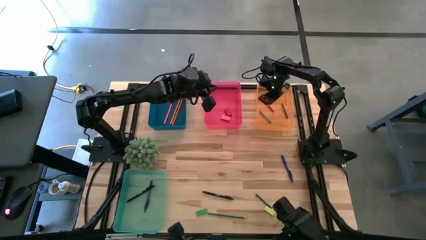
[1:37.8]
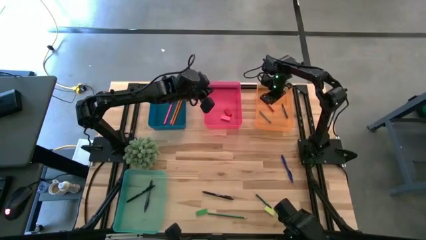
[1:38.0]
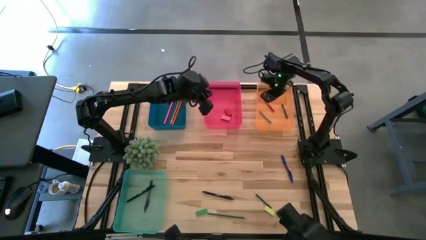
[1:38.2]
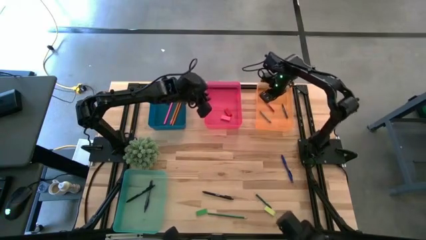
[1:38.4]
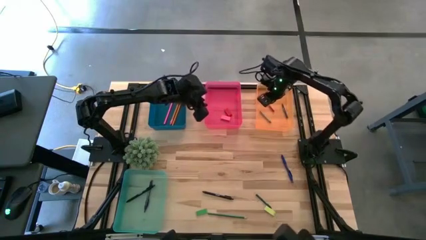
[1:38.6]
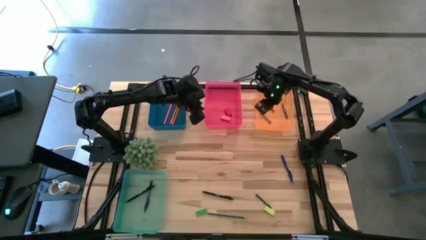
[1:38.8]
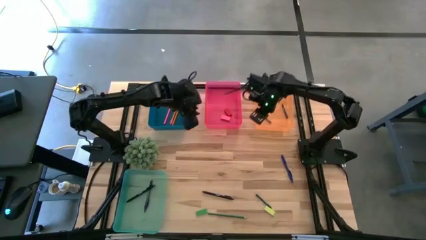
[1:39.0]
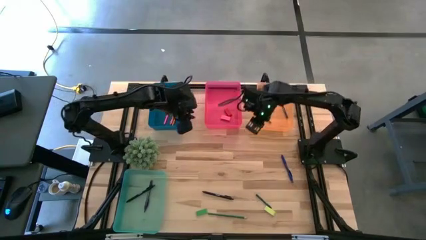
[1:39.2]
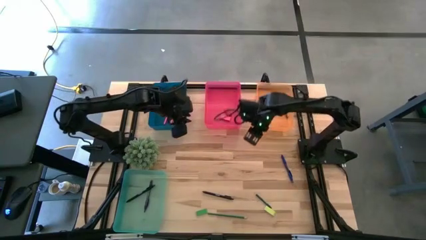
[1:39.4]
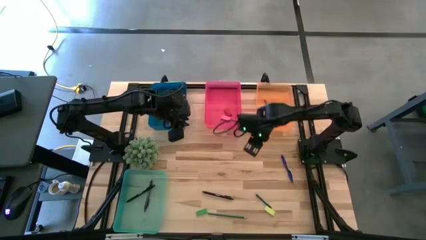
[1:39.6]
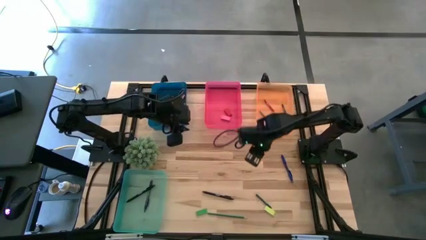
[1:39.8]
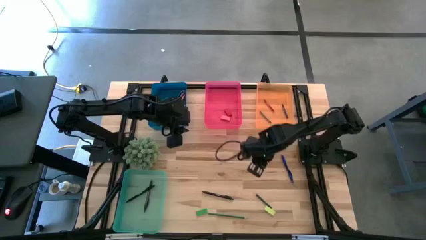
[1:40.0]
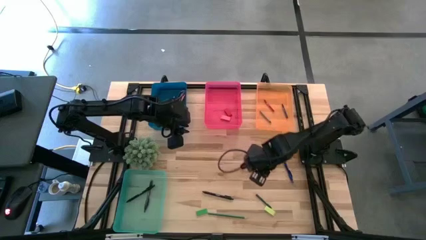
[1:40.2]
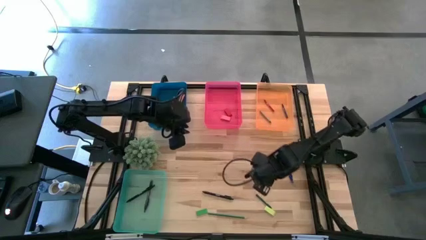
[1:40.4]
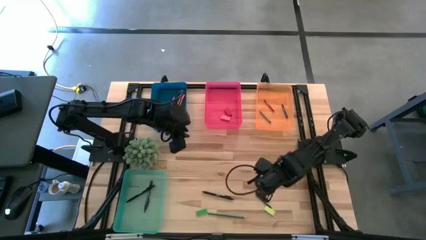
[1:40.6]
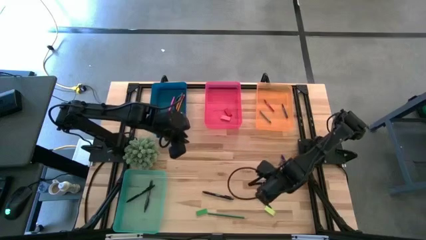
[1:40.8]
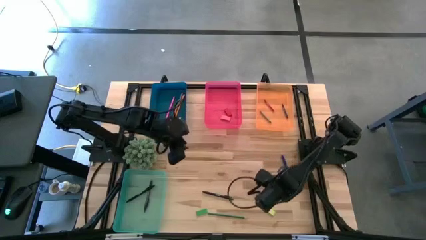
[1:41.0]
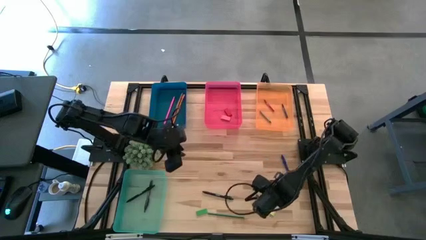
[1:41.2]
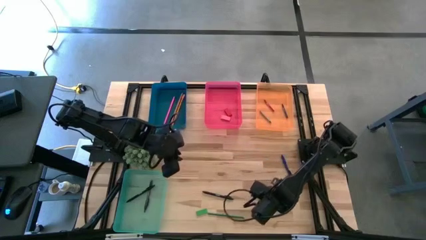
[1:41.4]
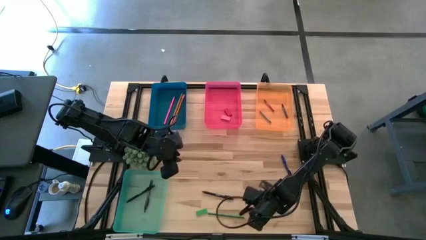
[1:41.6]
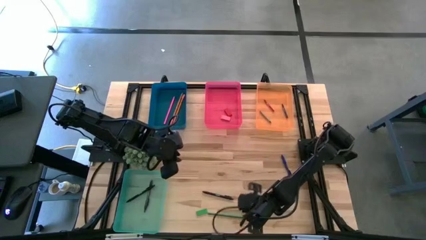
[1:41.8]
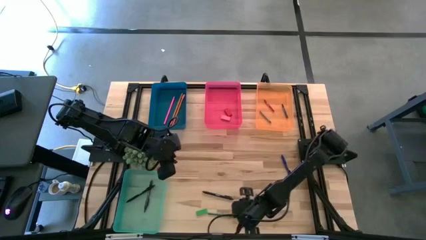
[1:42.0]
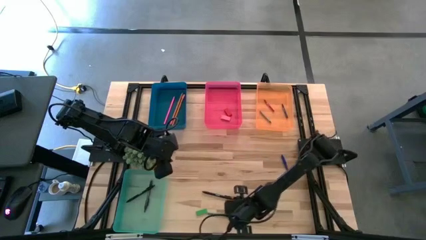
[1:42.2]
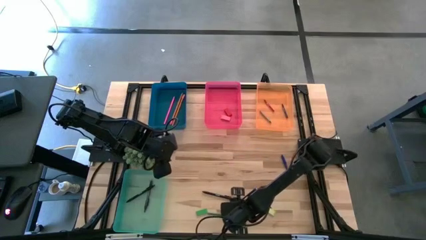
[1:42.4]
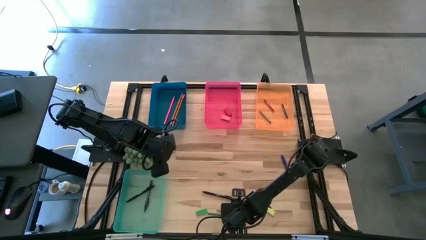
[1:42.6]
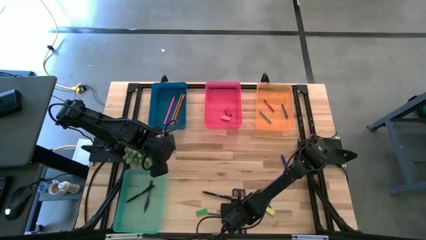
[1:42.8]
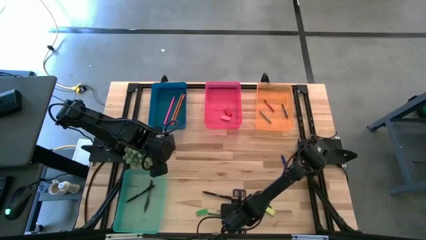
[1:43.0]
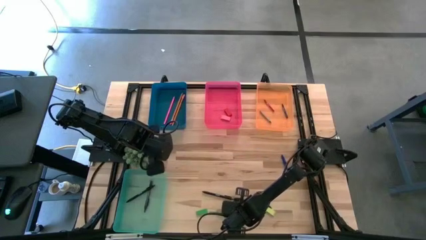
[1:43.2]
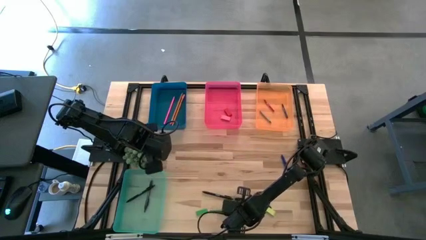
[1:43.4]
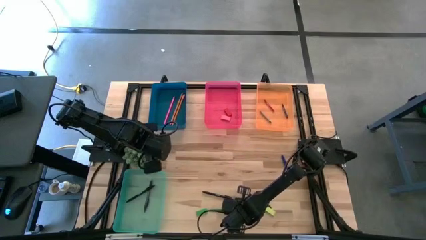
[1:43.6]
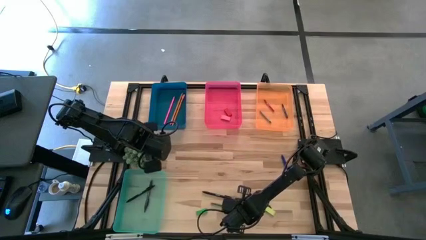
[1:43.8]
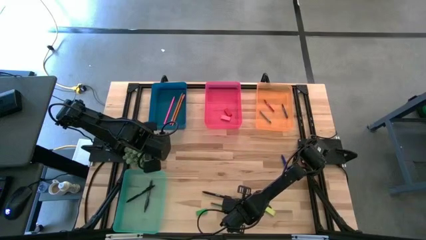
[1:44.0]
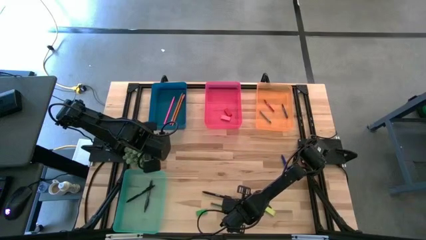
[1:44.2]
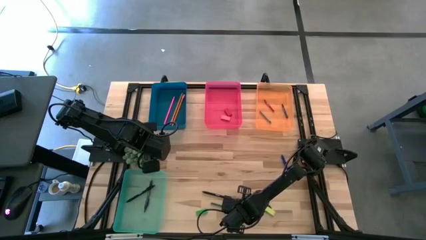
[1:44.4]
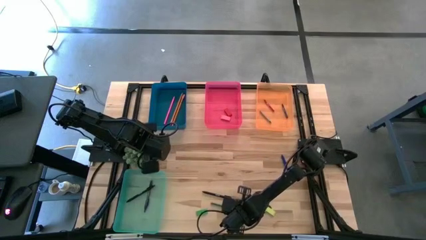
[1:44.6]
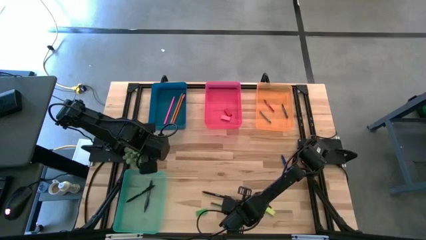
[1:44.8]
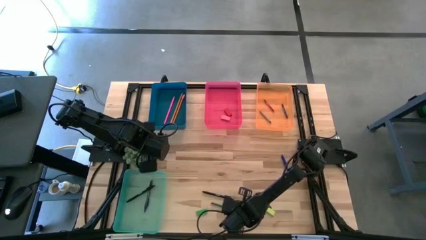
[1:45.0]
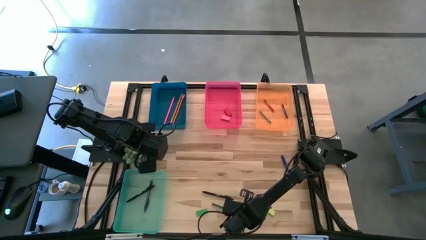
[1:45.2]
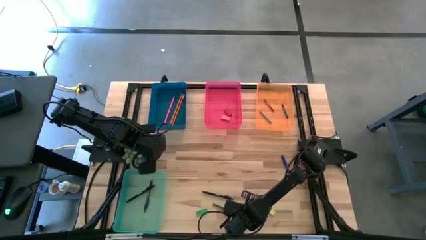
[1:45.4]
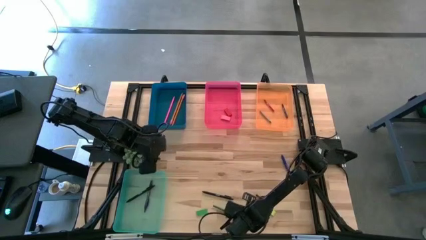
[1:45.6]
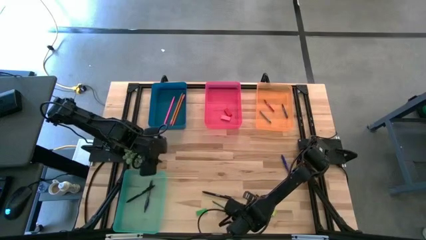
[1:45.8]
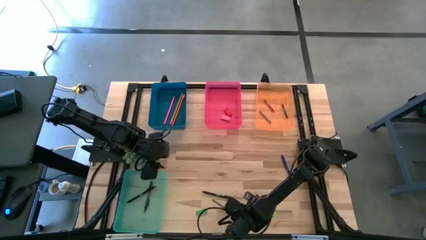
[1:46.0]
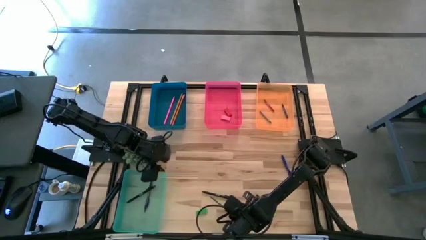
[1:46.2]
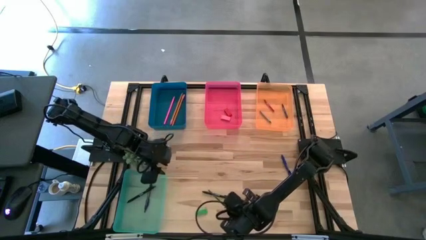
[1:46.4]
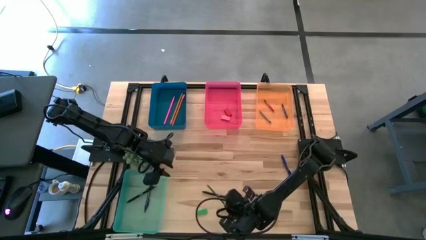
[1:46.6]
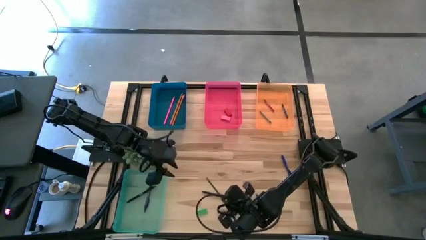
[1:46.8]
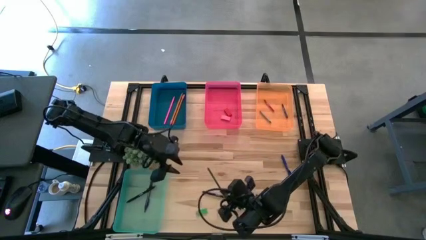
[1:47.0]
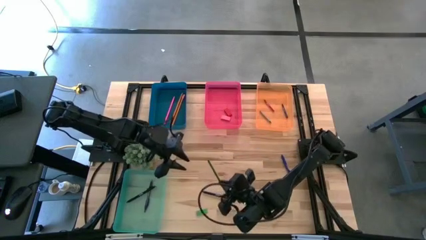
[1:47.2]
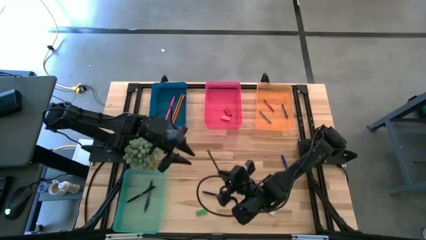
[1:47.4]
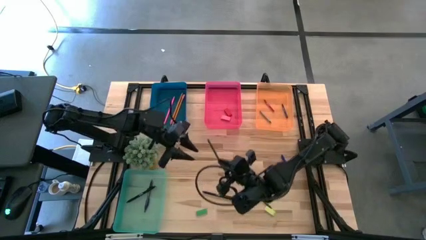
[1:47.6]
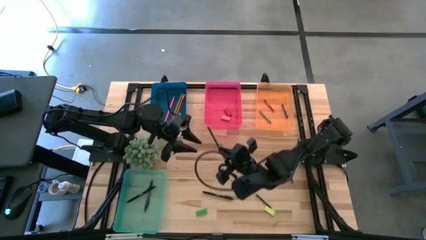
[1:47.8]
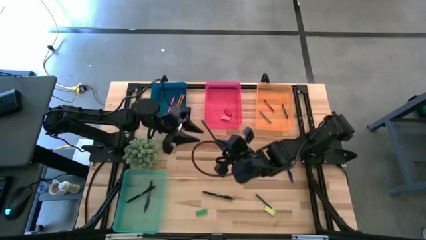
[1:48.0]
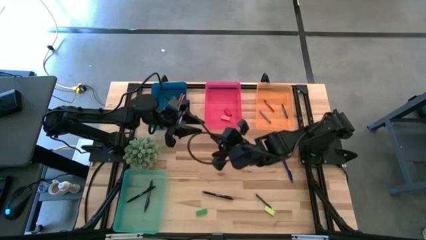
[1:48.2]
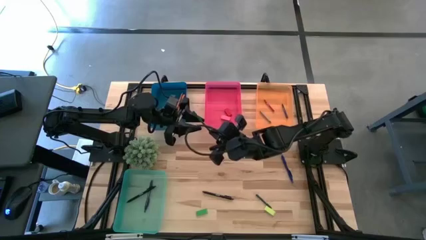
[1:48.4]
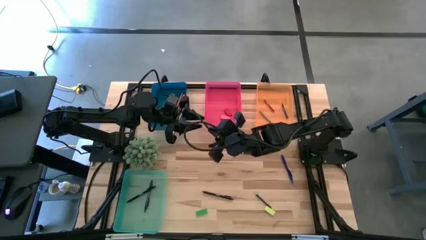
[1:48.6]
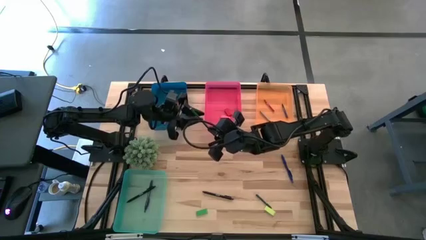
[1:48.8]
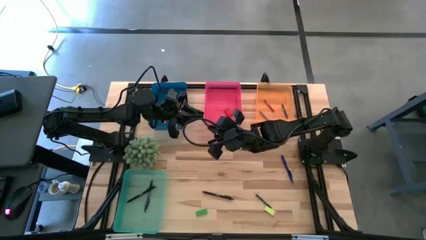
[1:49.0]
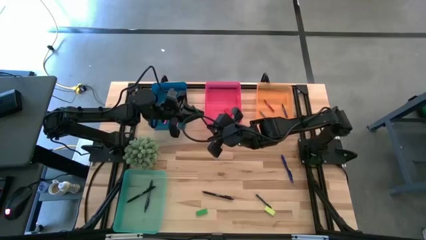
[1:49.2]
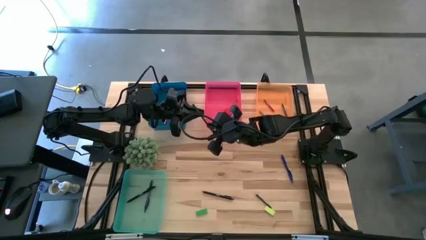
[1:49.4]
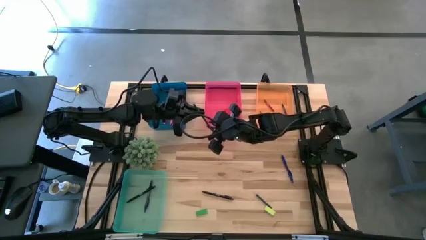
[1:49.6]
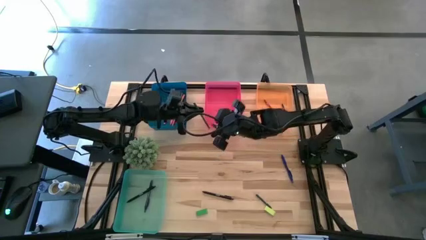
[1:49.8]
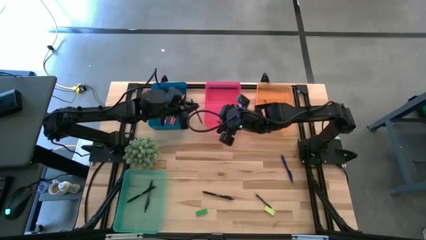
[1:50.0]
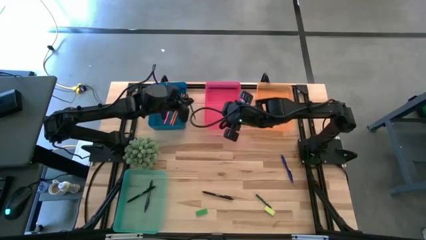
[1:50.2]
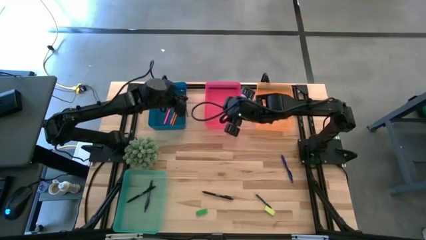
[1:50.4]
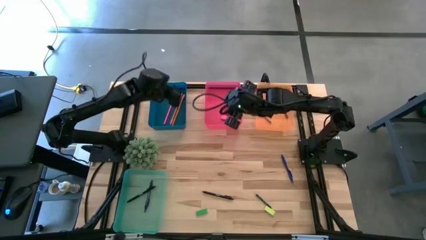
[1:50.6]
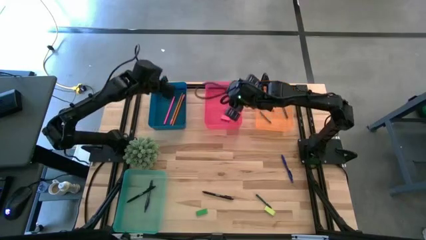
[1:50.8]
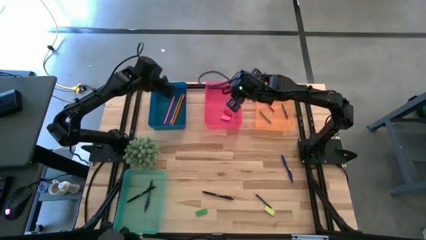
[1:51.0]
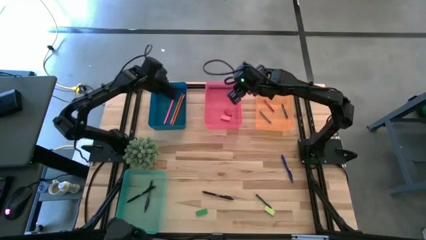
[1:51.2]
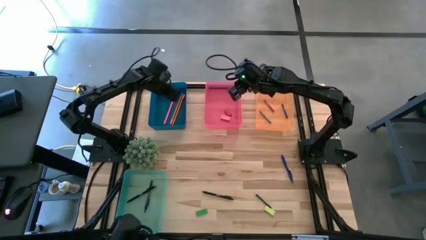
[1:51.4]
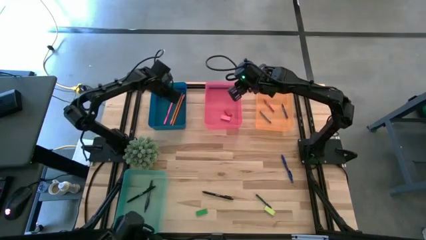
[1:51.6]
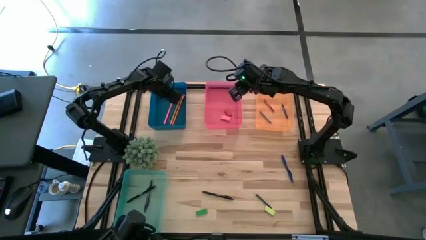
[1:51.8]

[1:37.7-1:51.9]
Task: Sort crayons/erasers/pens/pencils in bins
Put the green pencil into the blue bin

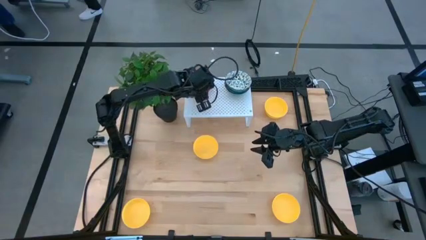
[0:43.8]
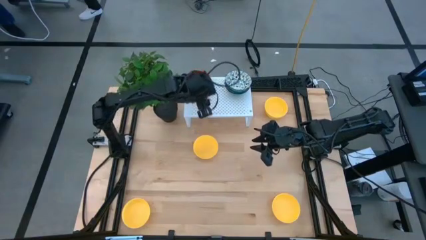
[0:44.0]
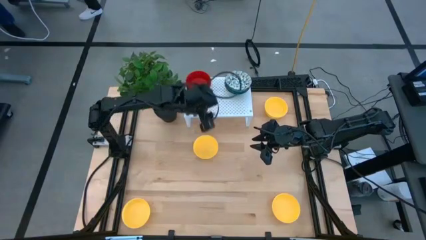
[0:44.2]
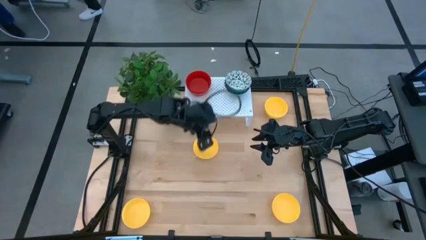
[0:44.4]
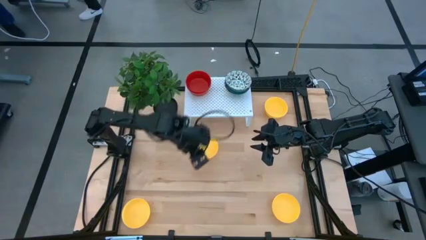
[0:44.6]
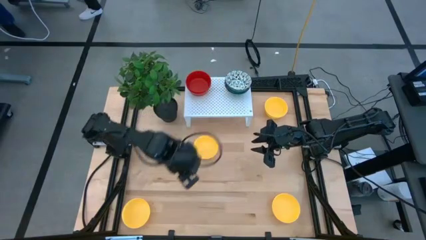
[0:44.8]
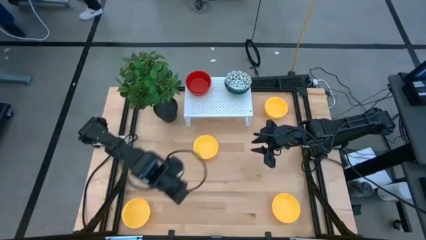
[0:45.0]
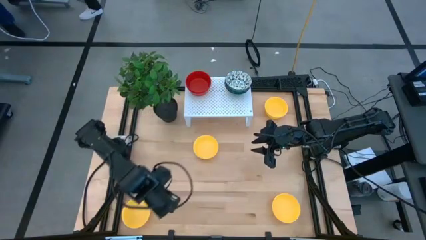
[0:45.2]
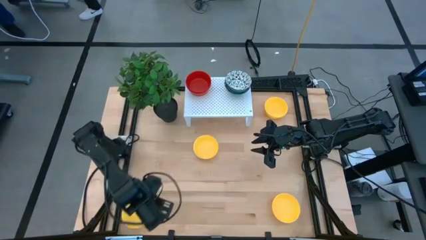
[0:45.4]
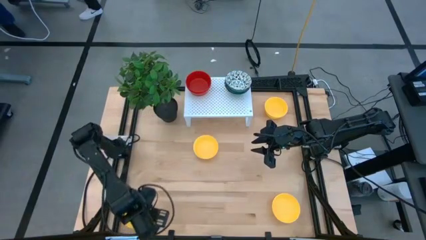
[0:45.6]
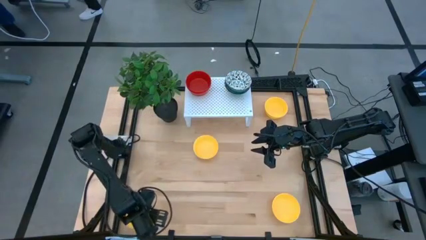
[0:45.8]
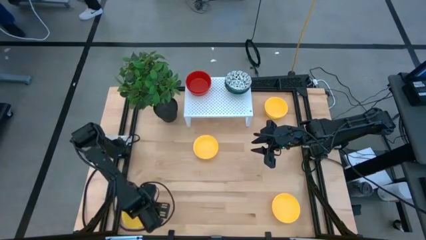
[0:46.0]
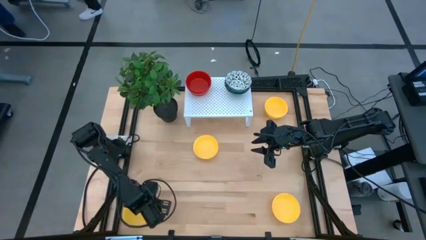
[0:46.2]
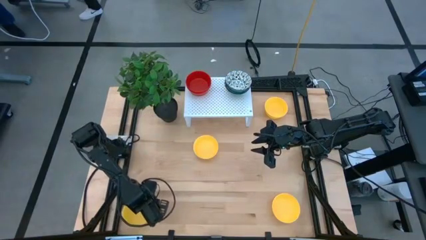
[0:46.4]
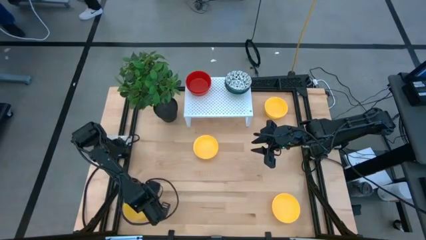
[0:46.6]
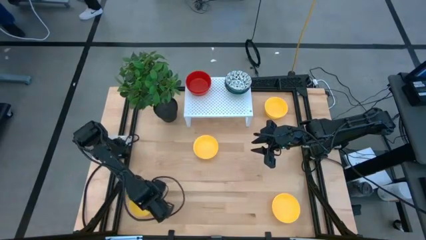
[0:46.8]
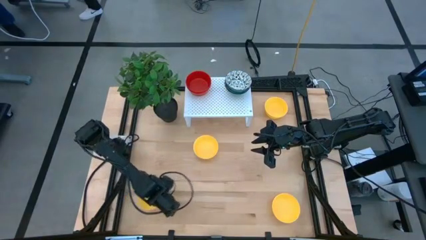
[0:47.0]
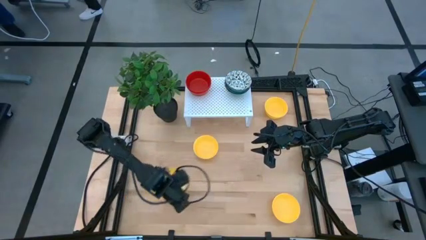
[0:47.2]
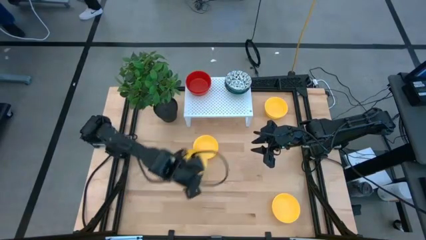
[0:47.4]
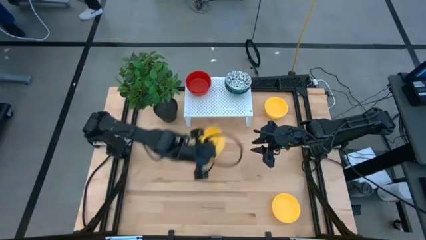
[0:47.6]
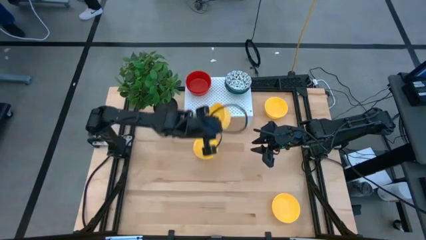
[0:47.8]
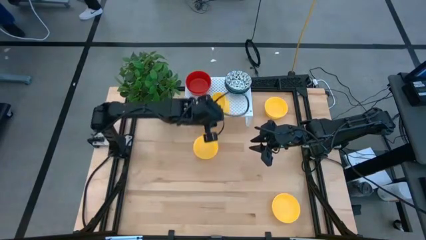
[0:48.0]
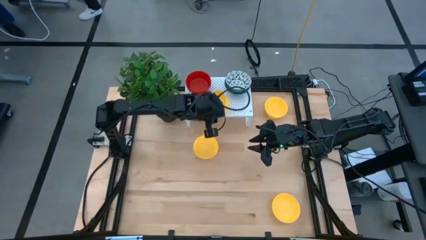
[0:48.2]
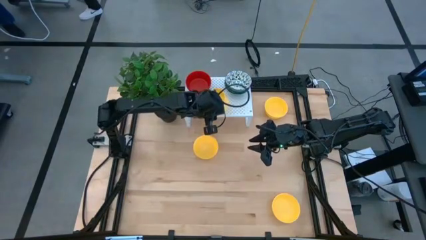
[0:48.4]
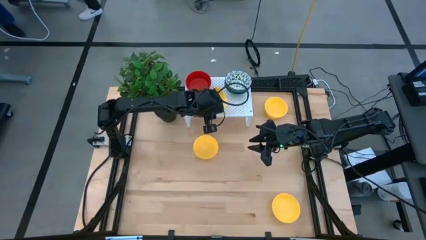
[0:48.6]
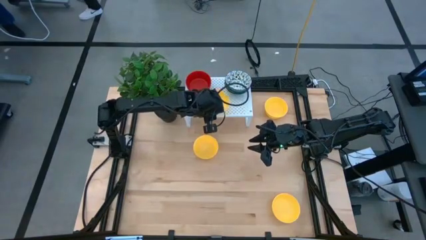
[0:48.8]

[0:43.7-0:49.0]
Task: Pick & Place Mini bowls
Put the yellow bowl on the shelf
